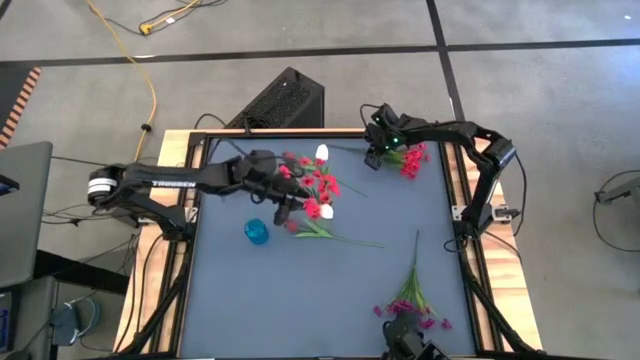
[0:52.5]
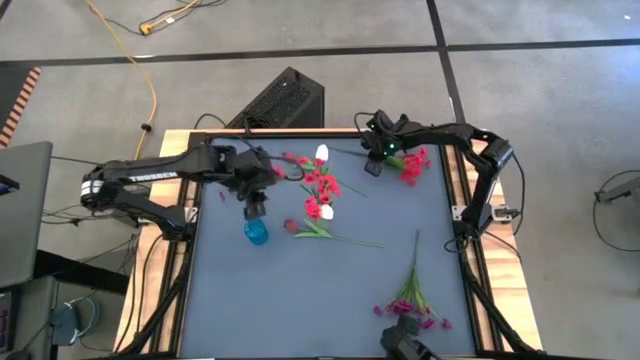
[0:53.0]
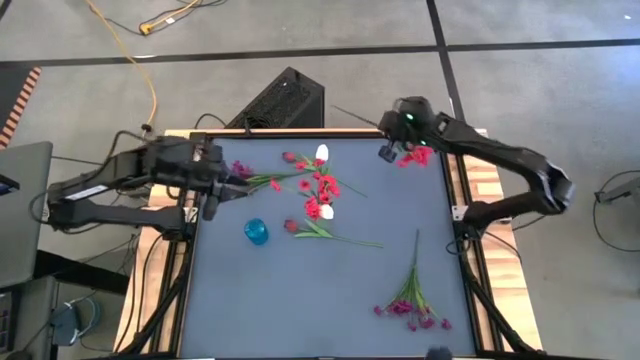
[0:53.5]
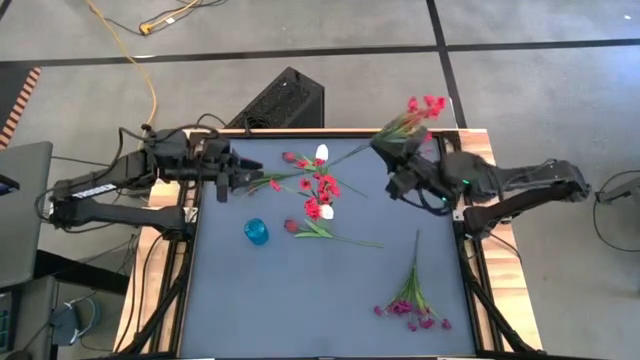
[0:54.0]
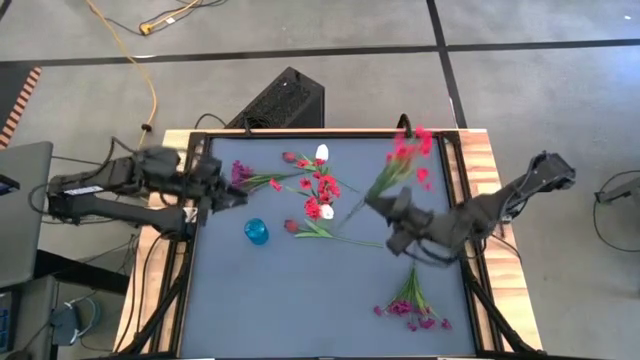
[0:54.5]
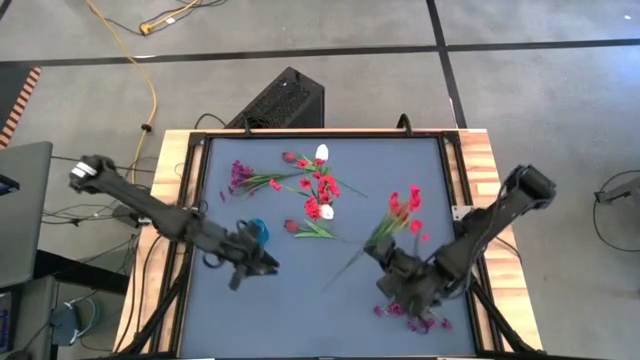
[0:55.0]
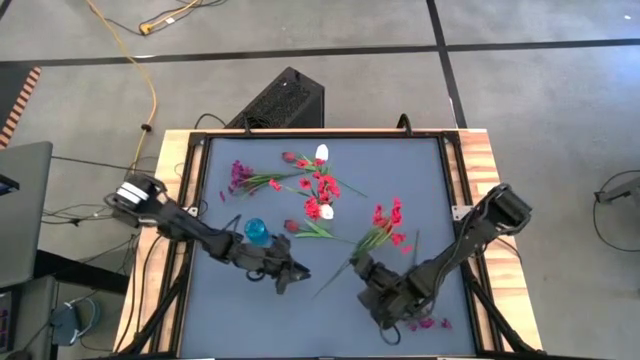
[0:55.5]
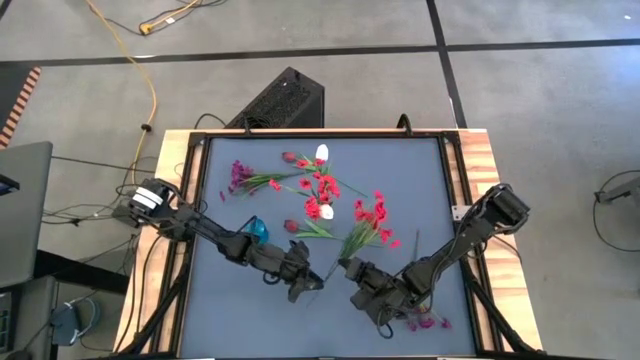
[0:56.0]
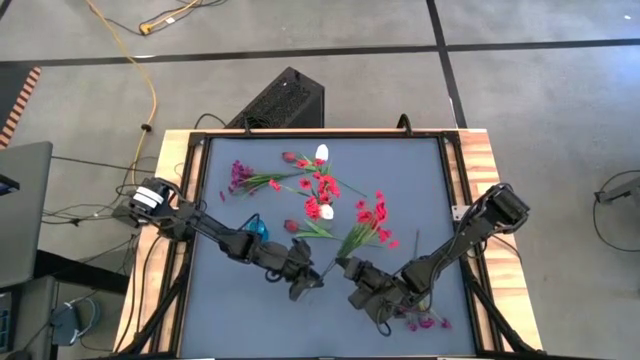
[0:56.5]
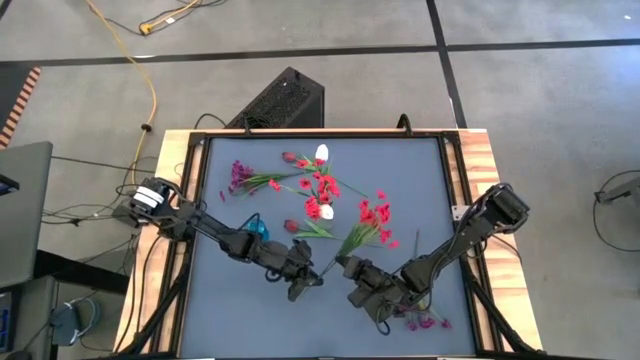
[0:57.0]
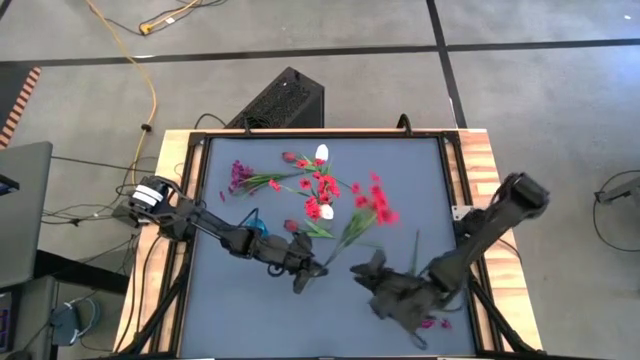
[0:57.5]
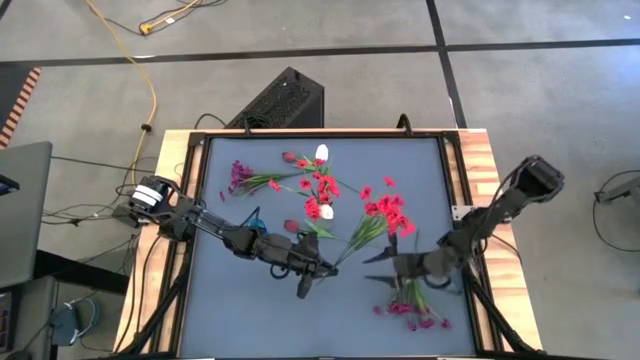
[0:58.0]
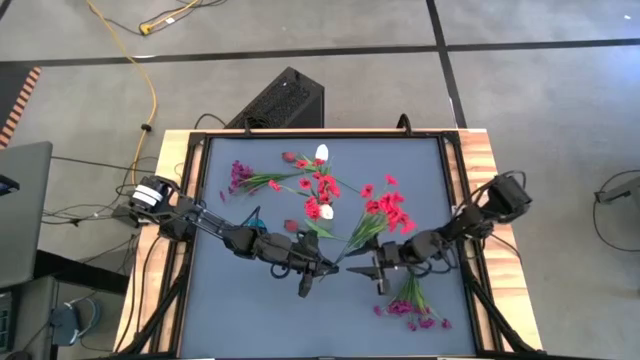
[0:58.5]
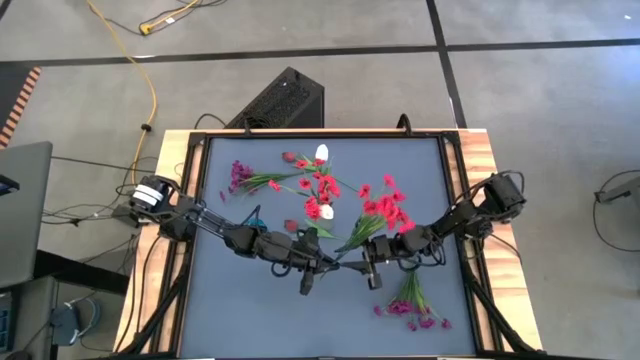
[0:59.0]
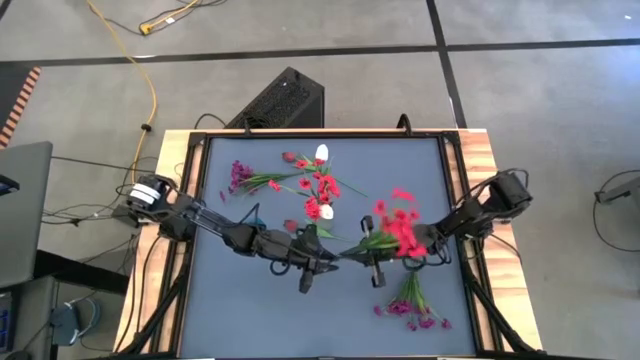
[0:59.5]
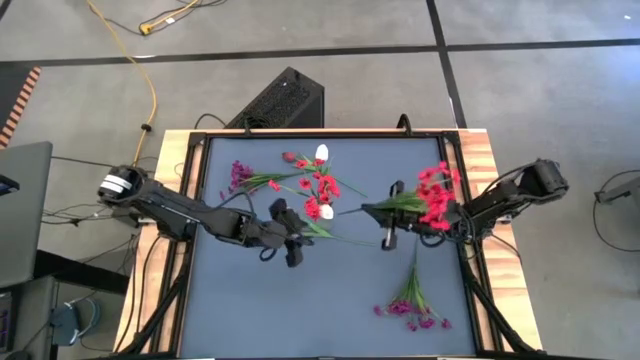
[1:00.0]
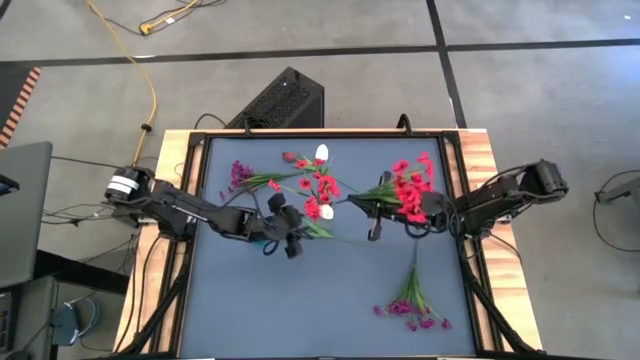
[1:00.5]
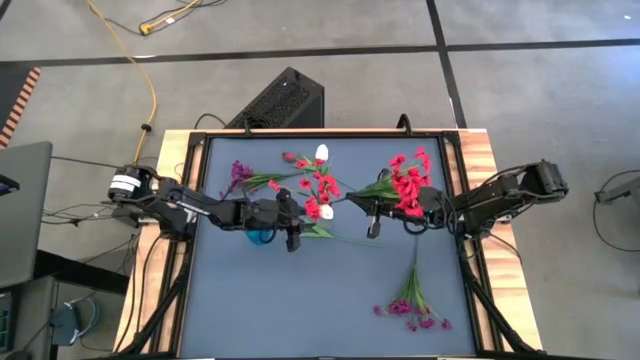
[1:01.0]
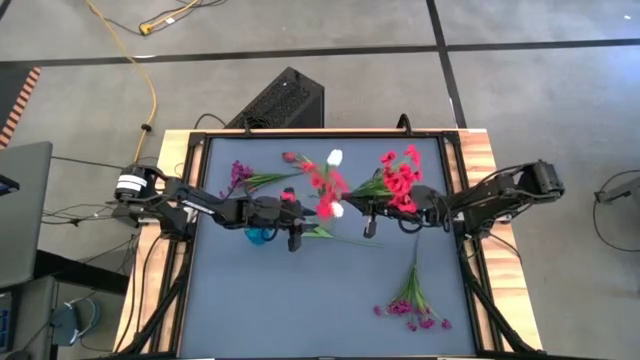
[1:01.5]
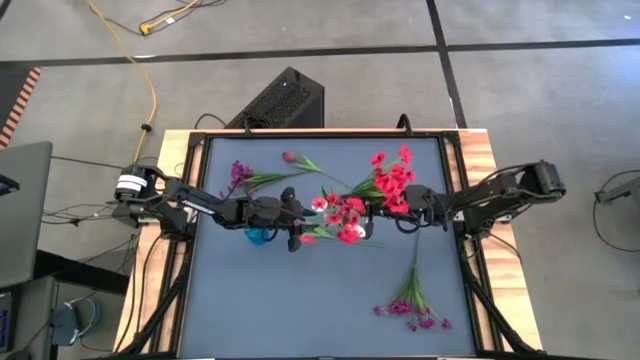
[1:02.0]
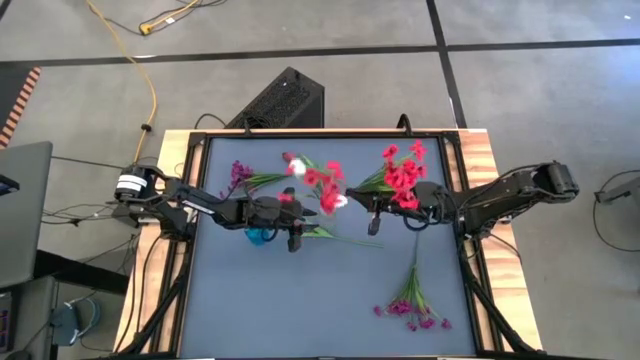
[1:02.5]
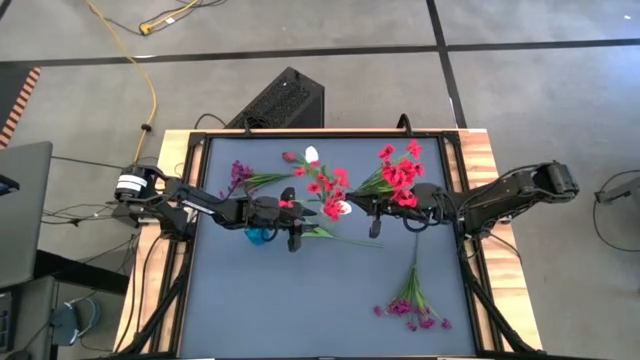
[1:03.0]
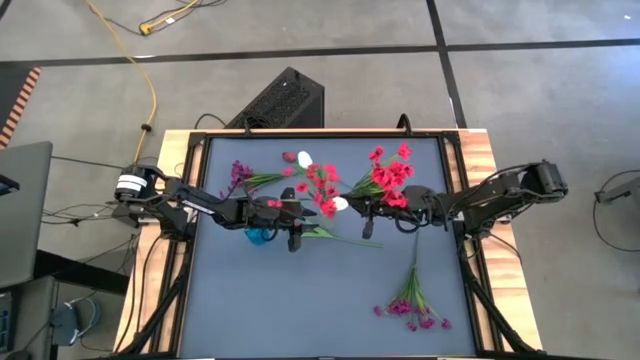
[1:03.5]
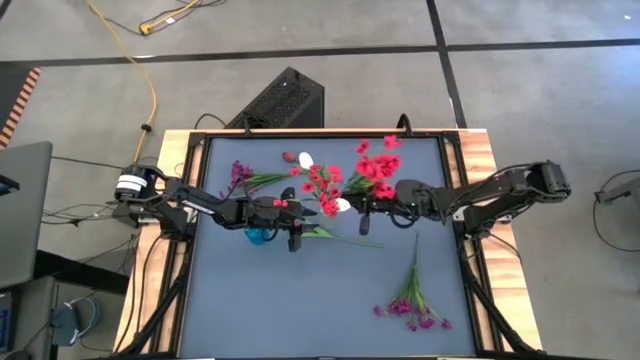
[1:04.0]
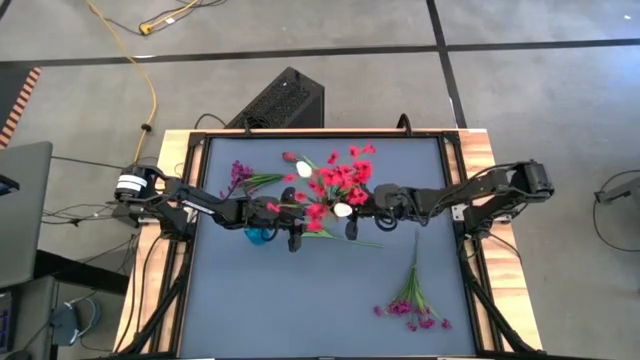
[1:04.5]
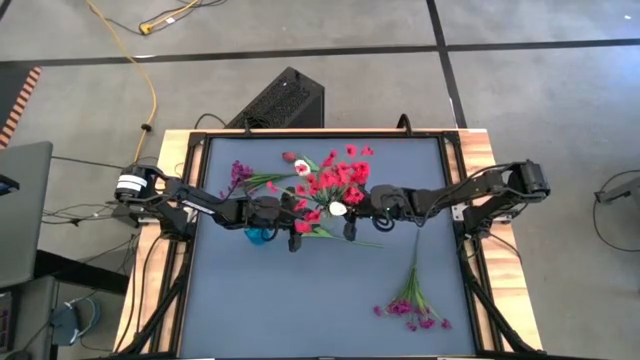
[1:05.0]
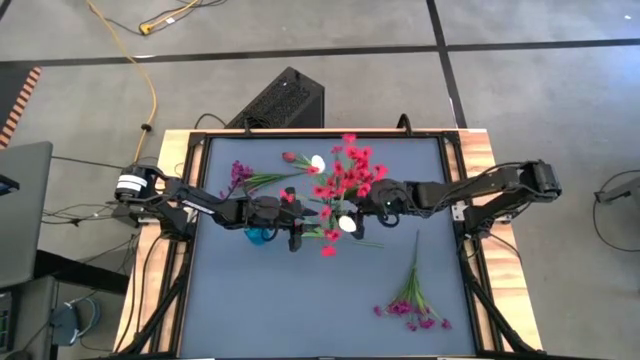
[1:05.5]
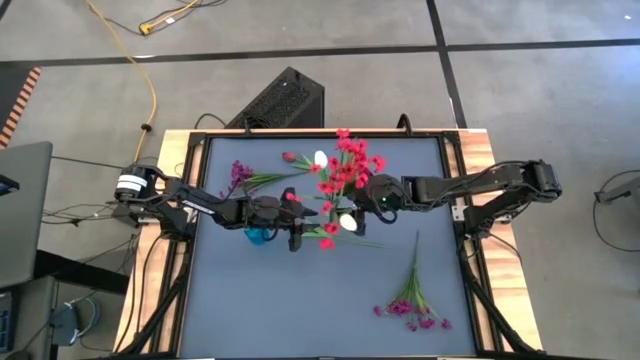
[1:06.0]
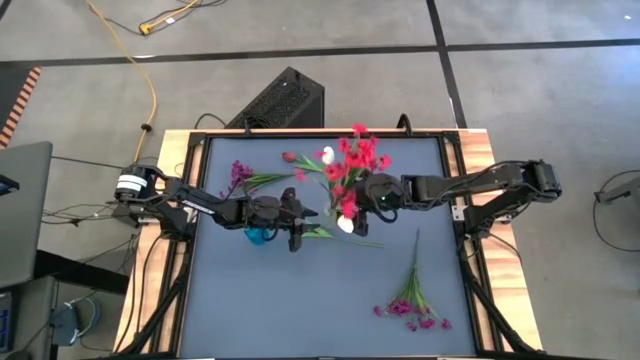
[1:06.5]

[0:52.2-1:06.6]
Task: Sort flowers into vase by color
Put the red flowers into the transparent vase

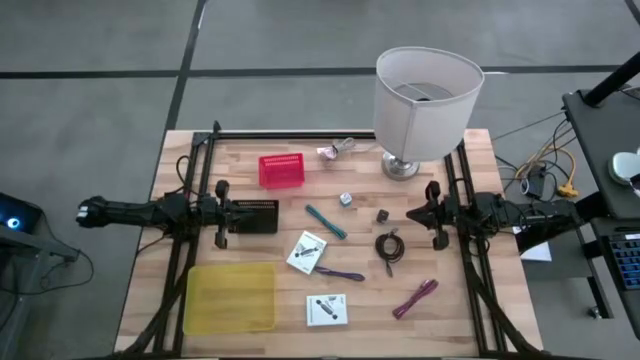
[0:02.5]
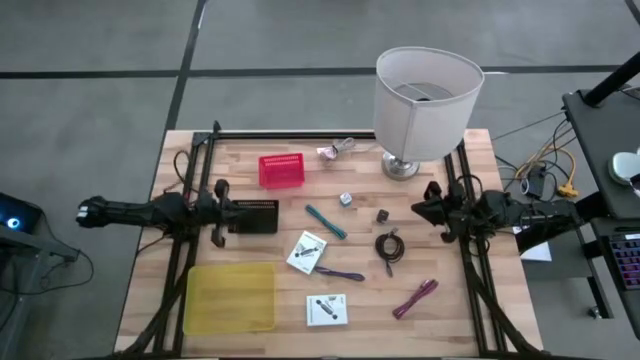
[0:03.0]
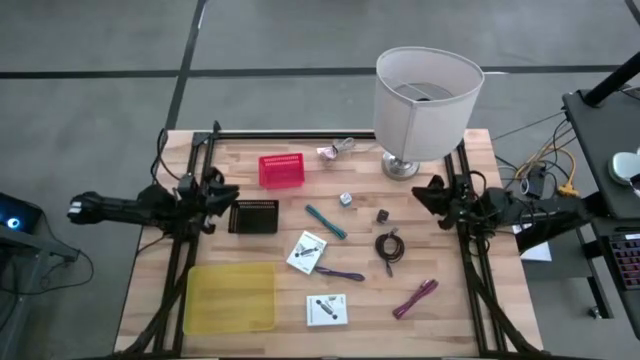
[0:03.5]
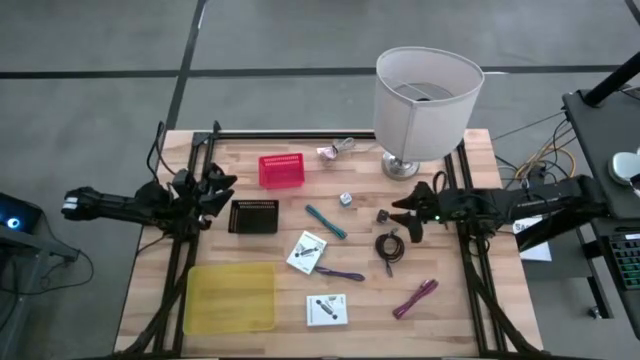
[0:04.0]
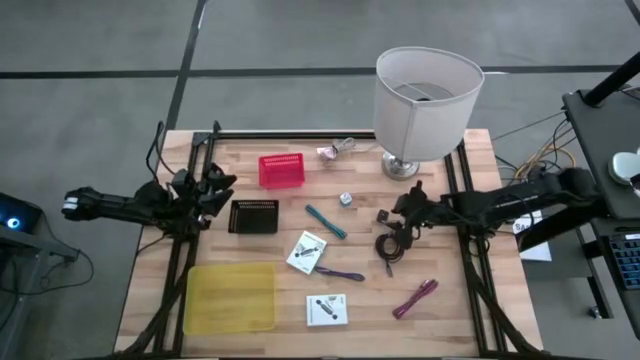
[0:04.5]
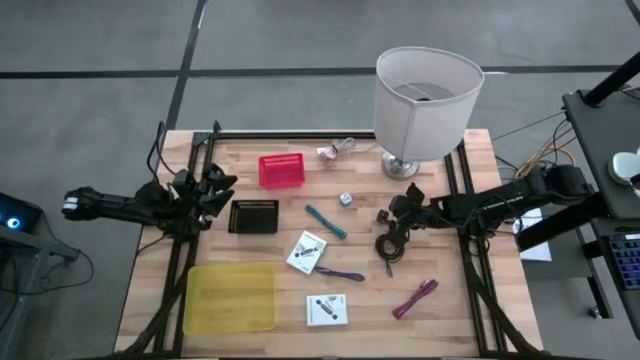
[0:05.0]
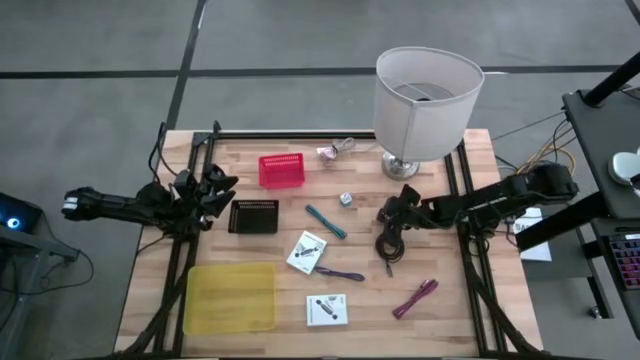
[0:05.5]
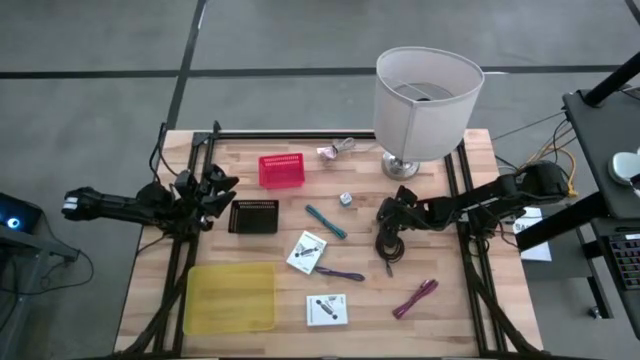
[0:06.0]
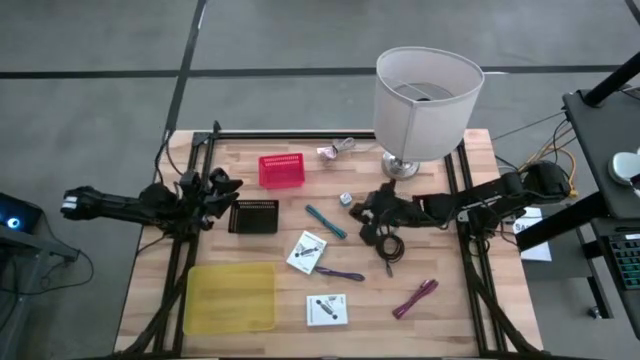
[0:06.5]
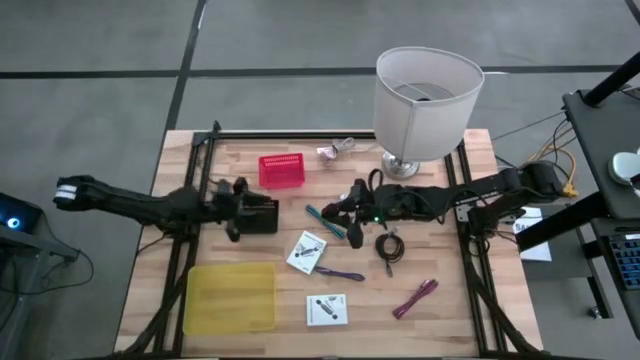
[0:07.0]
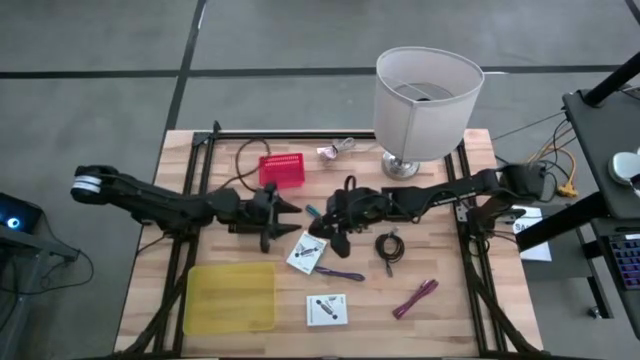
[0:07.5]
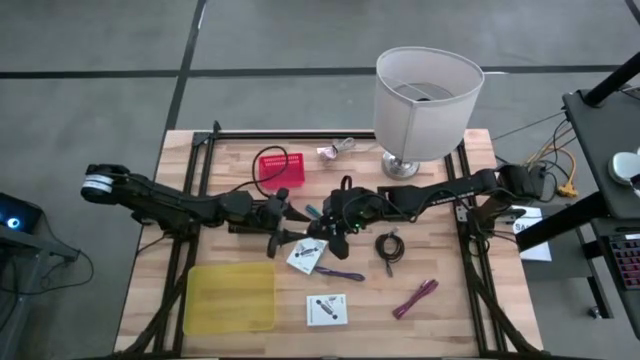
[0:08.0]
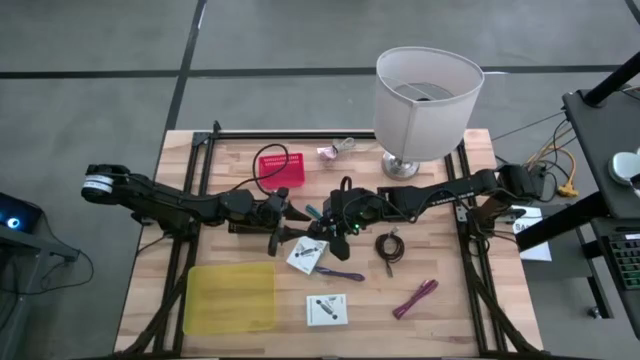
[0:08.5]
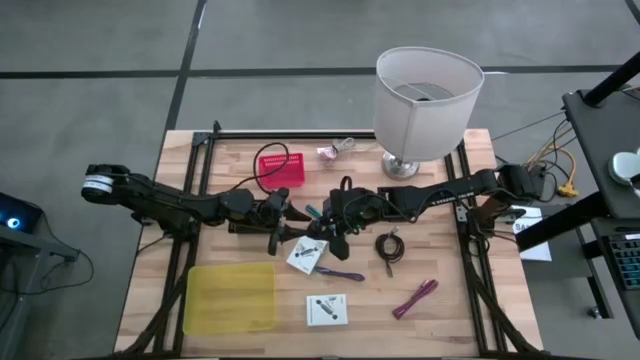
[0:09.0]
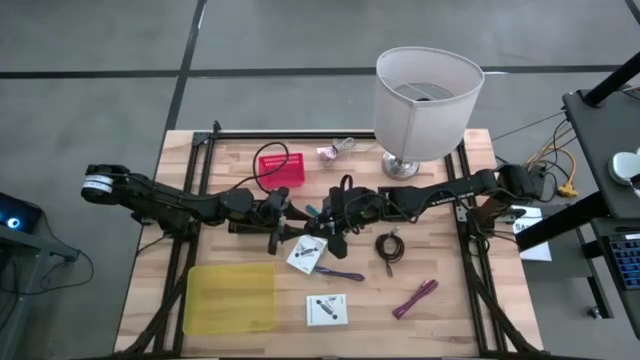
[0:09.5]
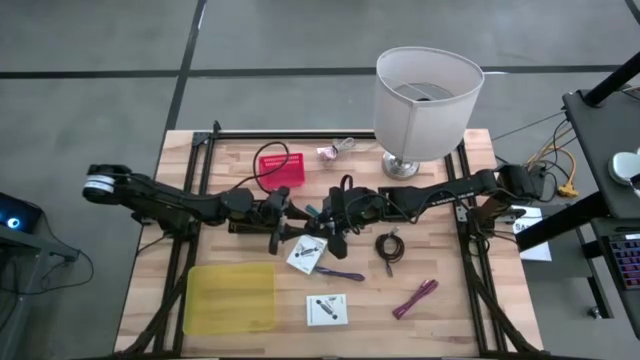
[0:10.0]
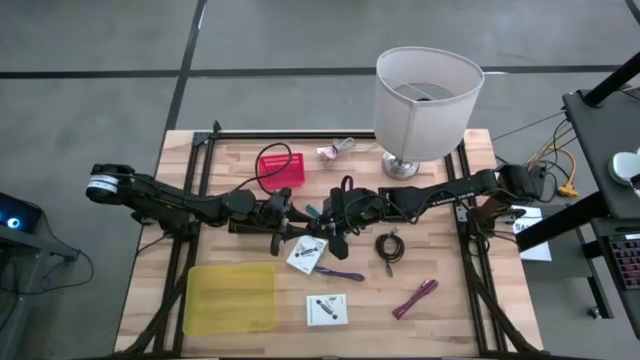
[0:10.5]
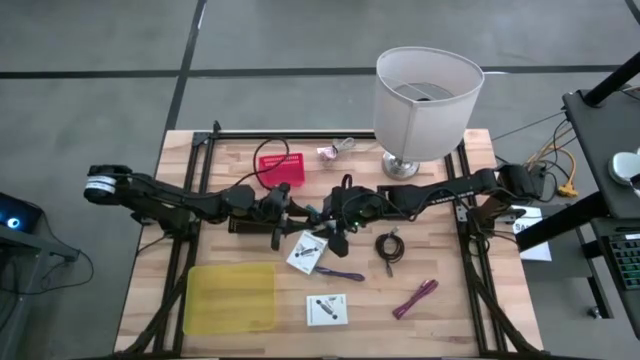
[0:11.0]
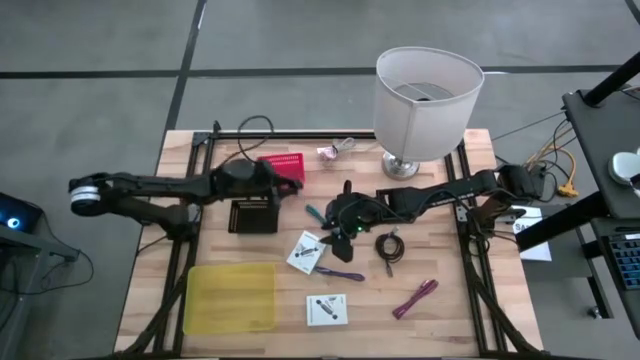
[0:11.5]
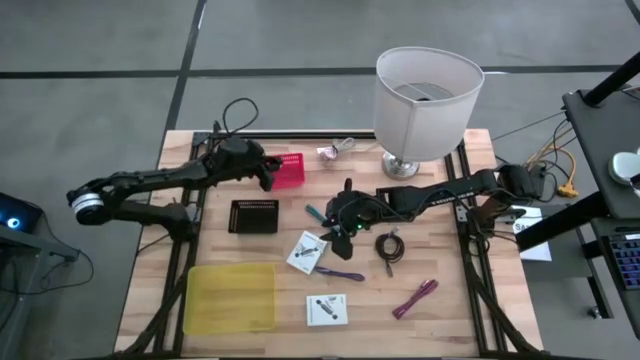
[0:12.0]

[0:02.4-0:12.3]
Task: Pick and place items into bin
Put the black charger adapter into the red bin
